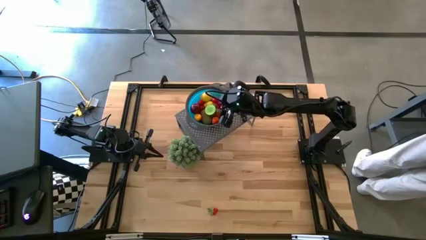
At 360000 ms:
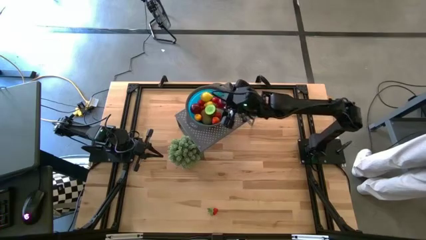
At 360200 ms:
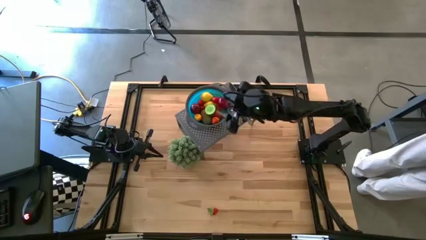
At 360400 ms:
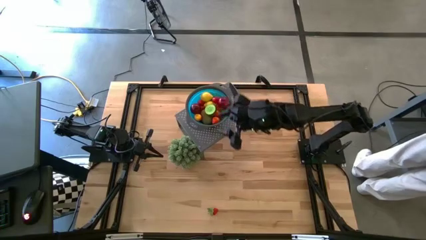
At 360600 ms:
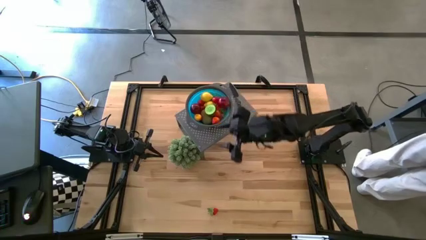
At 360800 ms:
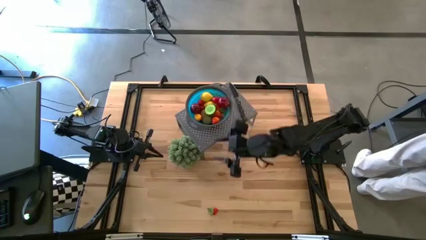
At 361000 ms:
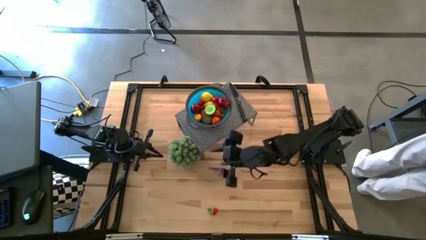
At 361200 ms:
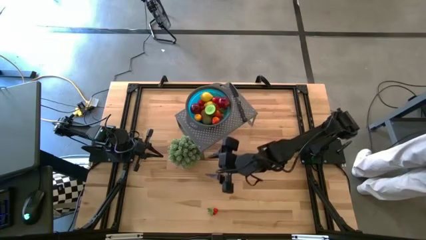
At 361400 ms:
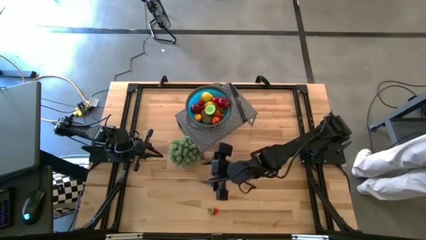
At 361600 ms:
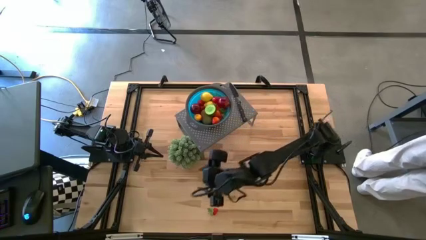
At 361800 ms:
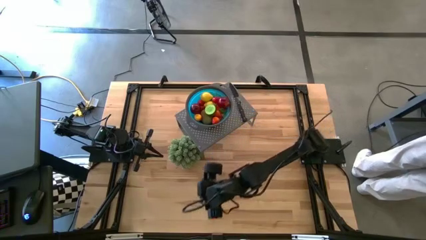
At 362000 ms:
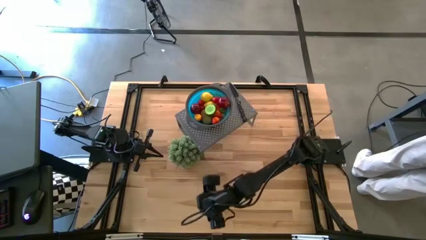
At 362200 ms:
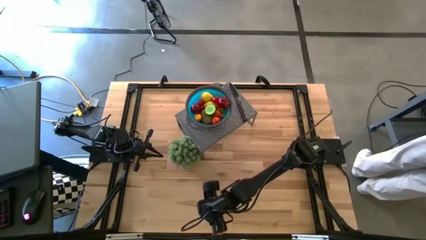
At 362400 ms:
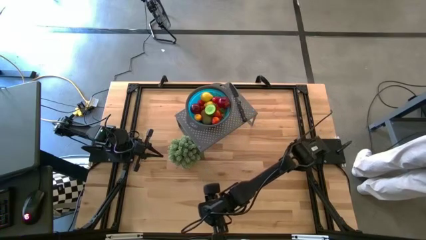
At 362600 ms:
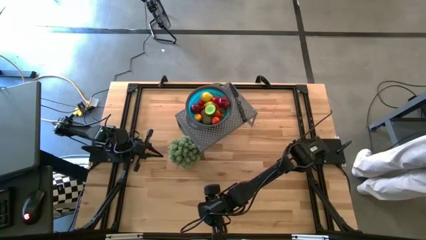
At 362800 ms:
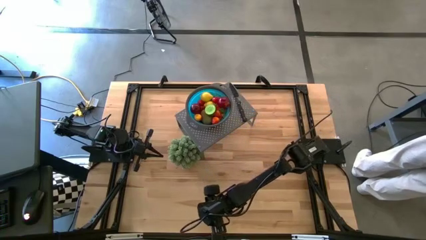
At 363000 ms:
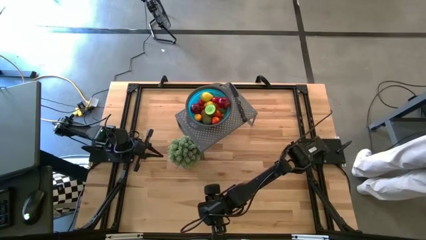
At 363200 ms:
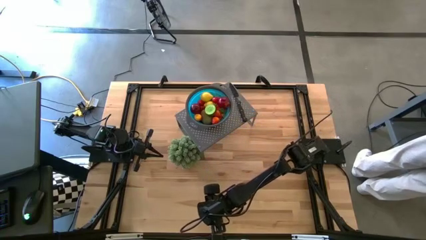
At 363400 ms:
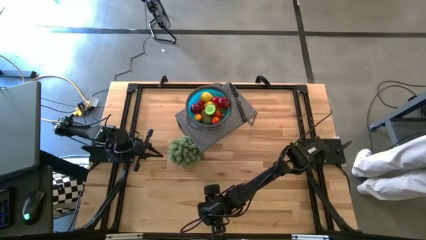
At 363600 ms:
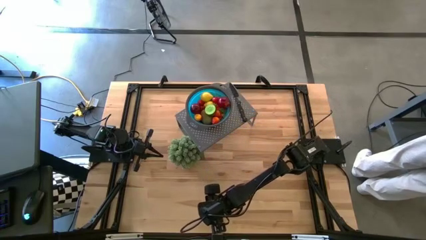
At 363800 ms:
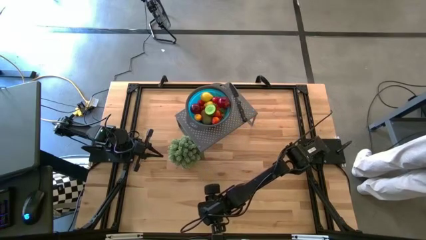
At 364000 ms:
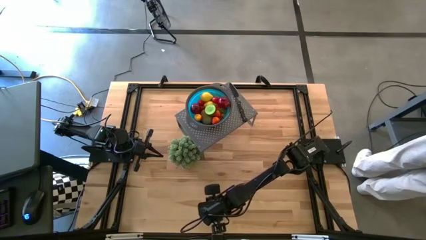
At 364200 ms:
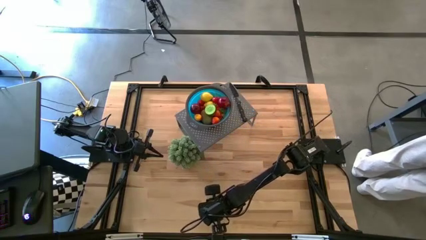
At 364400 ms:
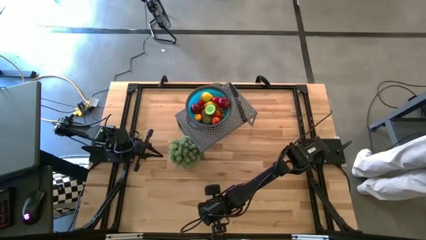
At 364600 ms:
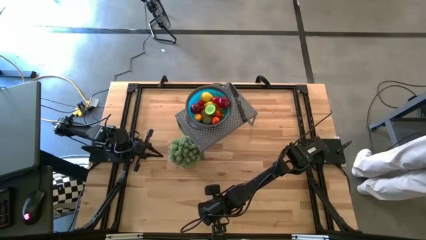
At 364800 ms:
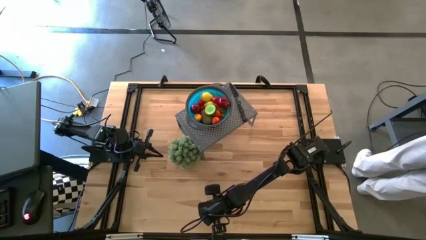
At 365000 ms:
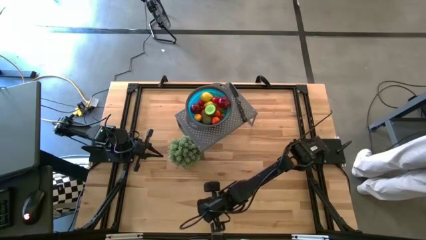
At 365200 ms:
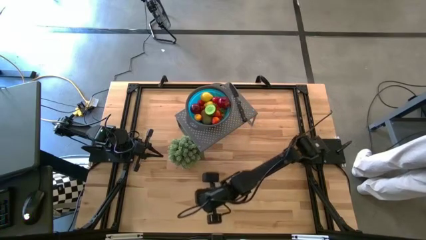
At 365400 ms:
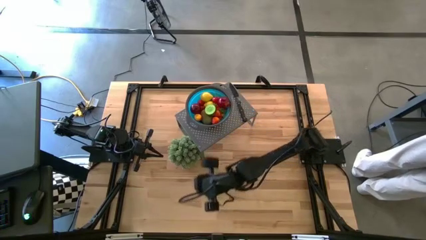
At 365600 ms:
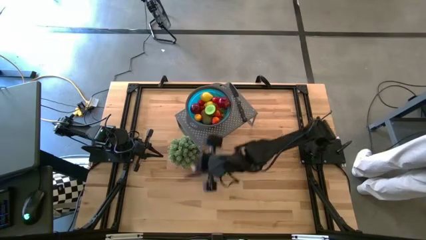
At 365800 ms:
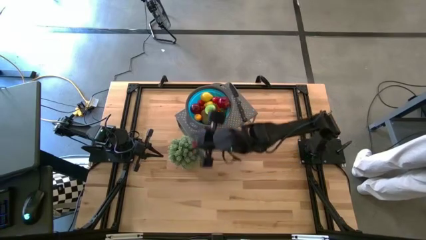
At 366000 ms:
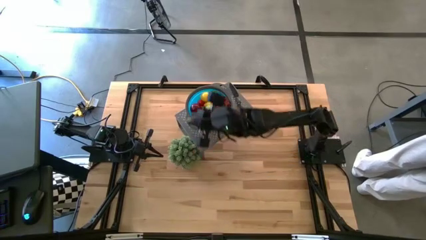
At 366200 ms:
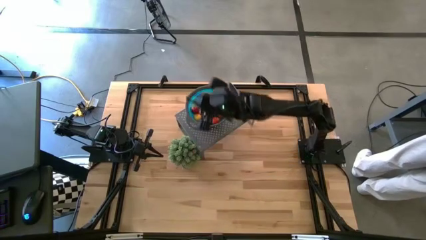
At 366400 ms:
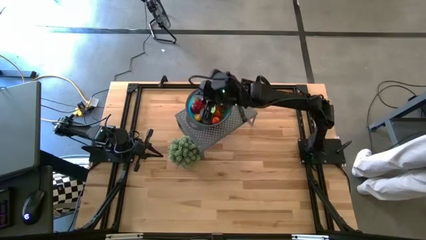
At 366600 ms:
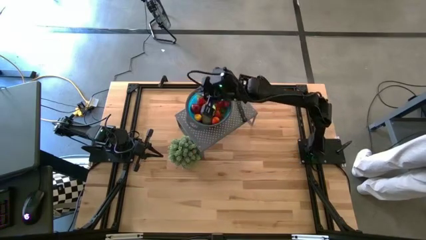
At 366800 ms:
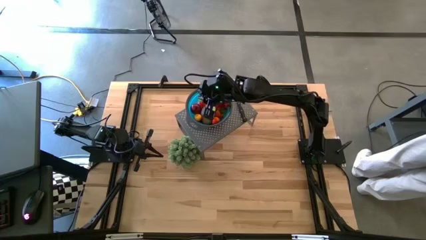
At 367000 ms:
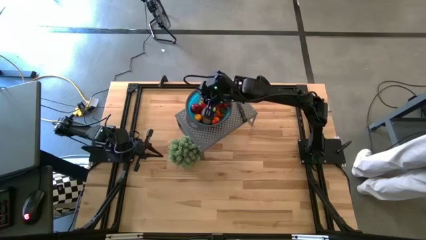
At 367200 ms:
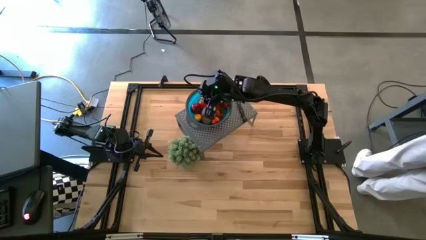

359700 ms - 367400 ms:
Task: Pick & Place Fruit
Put the strawberry into the blue strainer bowl on the shelf

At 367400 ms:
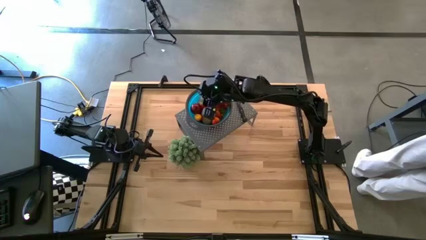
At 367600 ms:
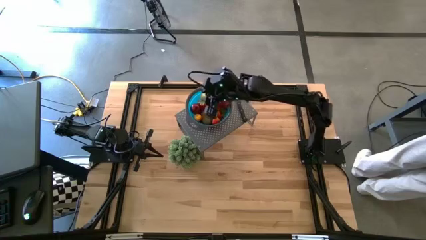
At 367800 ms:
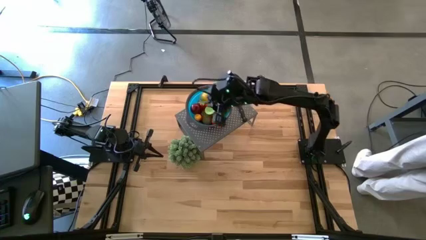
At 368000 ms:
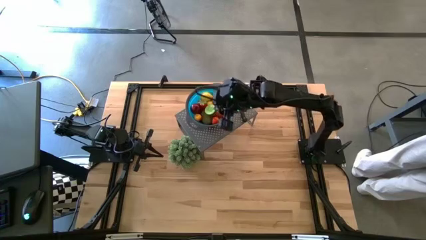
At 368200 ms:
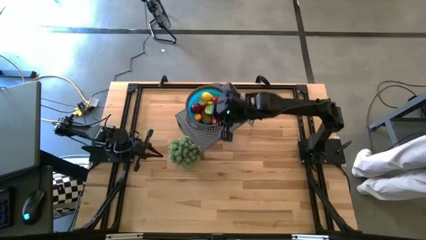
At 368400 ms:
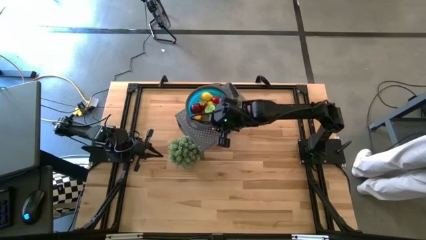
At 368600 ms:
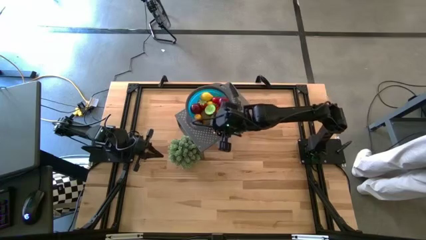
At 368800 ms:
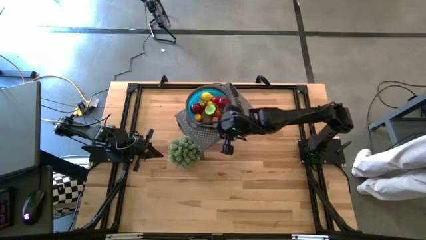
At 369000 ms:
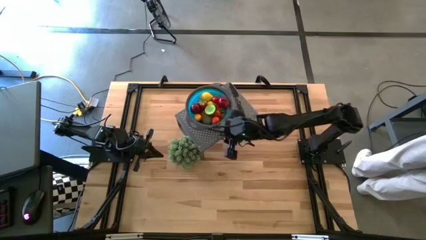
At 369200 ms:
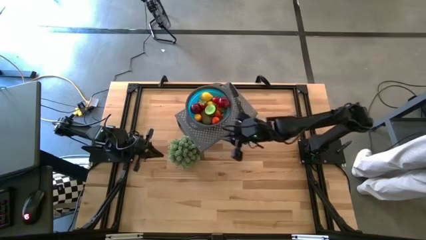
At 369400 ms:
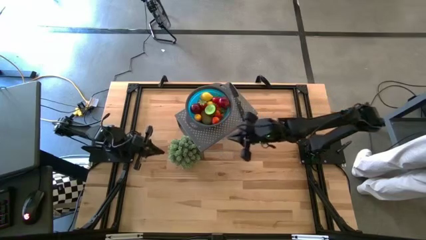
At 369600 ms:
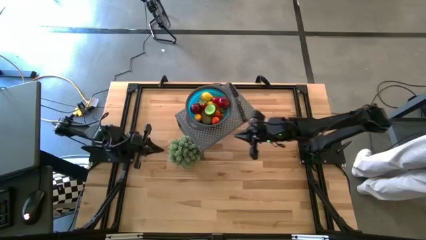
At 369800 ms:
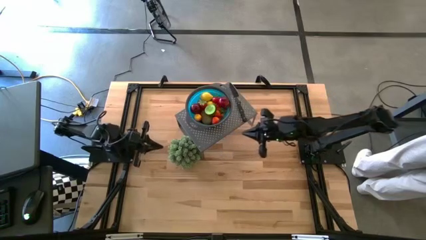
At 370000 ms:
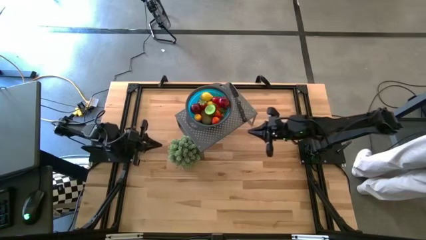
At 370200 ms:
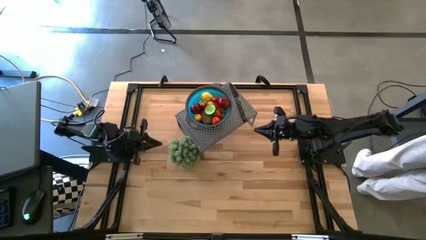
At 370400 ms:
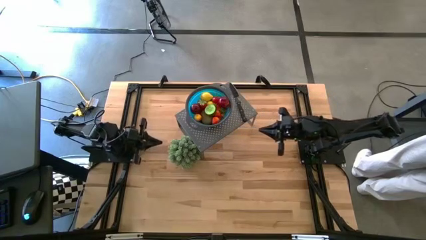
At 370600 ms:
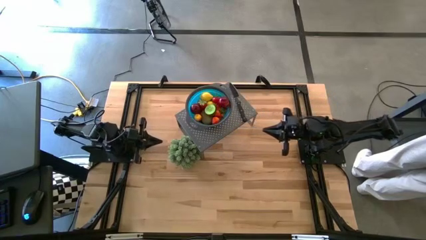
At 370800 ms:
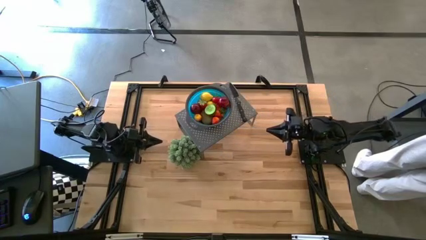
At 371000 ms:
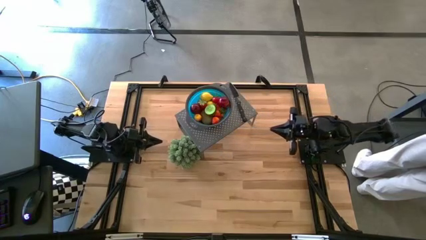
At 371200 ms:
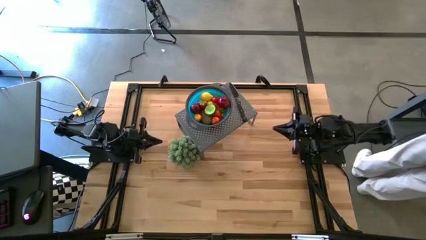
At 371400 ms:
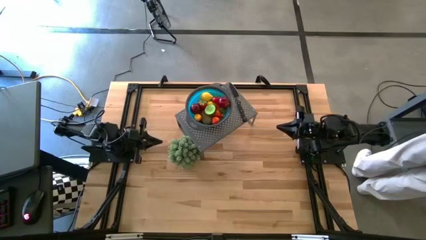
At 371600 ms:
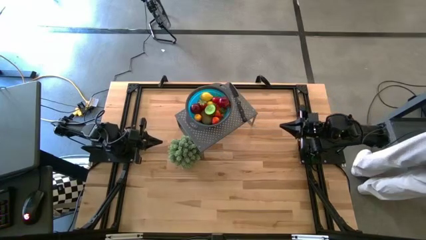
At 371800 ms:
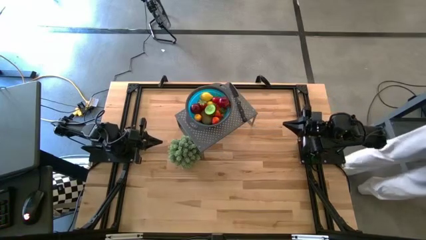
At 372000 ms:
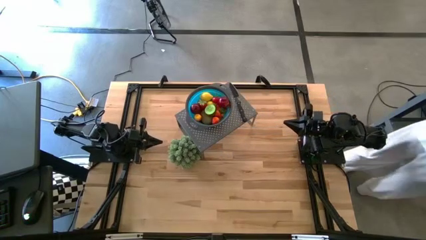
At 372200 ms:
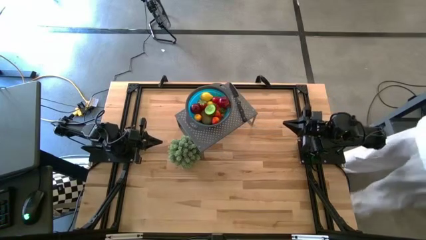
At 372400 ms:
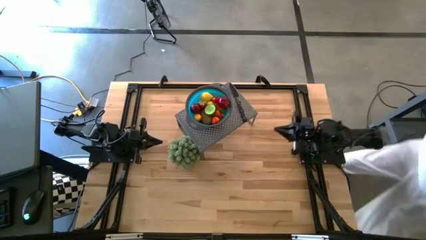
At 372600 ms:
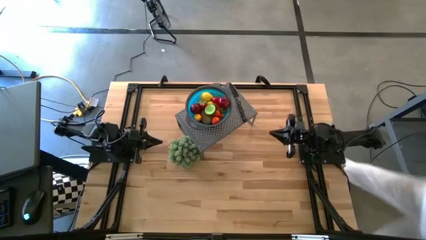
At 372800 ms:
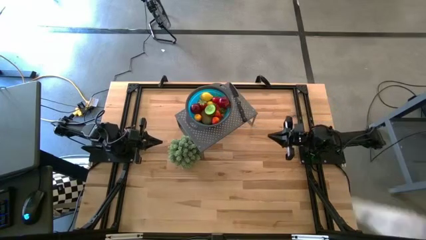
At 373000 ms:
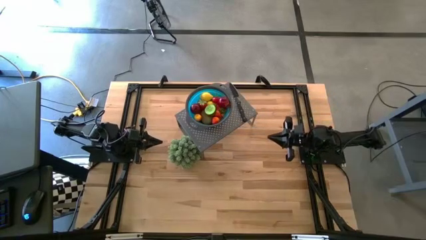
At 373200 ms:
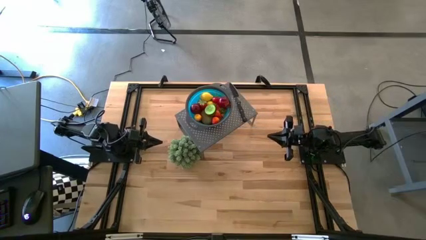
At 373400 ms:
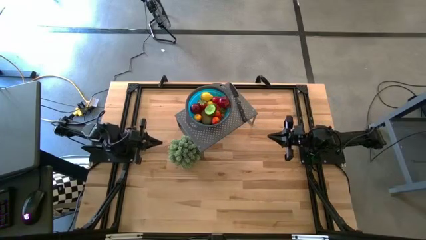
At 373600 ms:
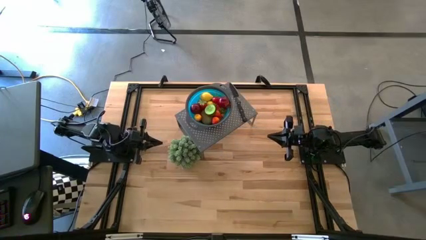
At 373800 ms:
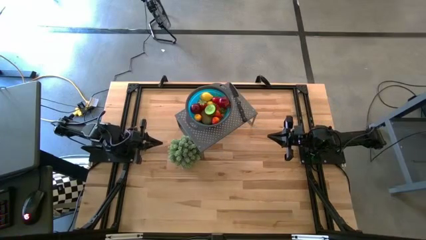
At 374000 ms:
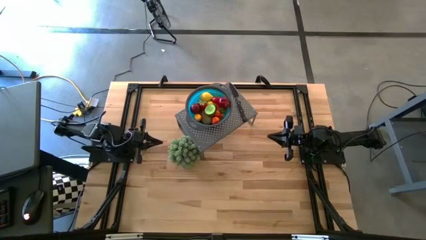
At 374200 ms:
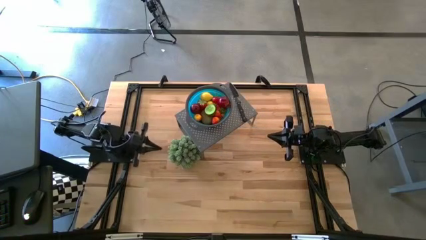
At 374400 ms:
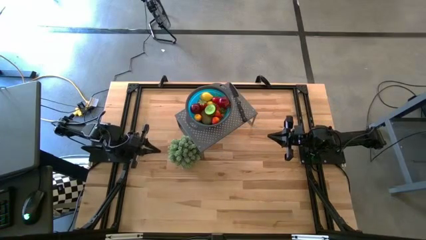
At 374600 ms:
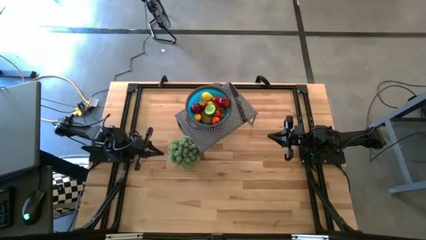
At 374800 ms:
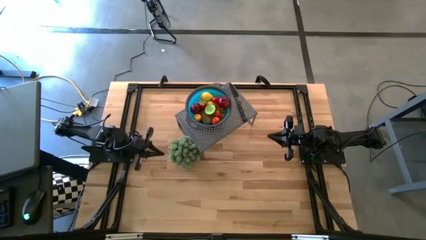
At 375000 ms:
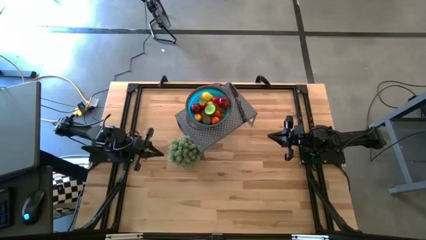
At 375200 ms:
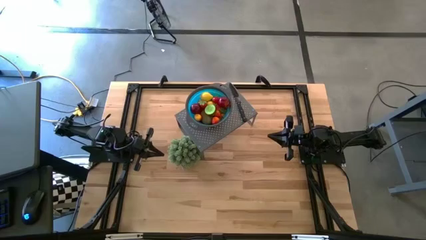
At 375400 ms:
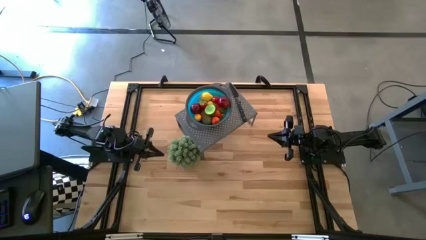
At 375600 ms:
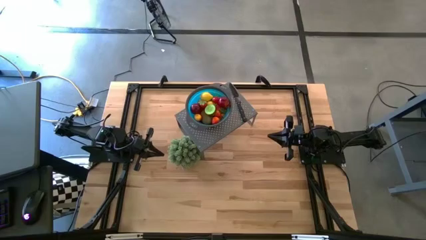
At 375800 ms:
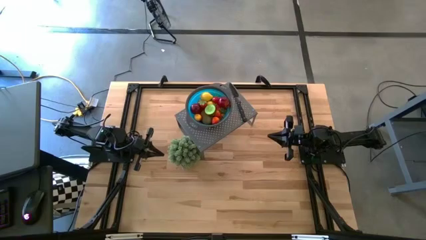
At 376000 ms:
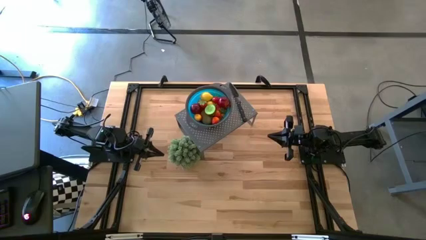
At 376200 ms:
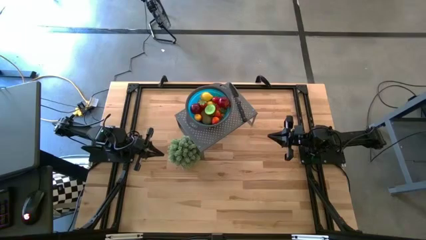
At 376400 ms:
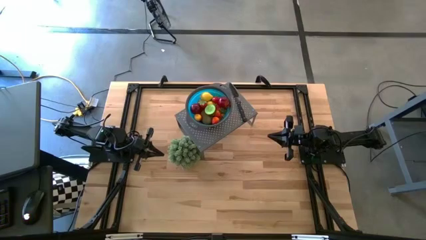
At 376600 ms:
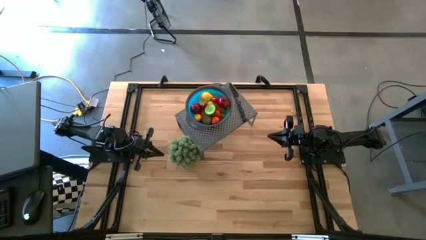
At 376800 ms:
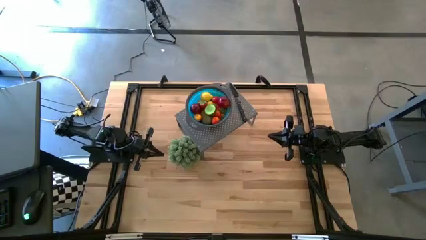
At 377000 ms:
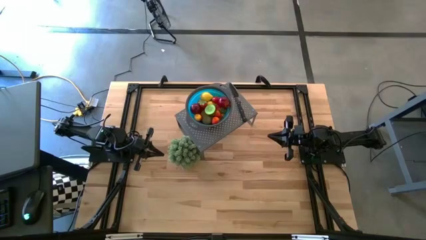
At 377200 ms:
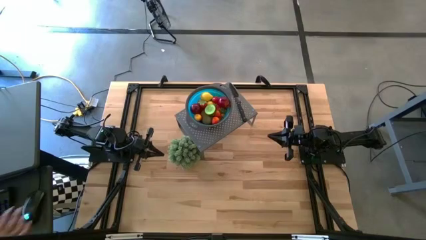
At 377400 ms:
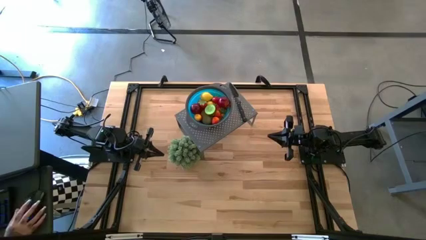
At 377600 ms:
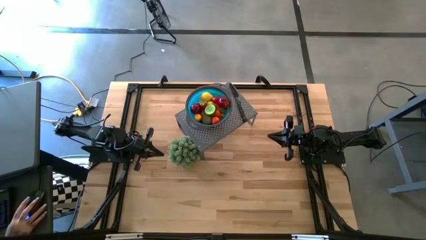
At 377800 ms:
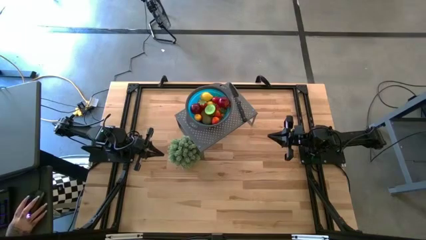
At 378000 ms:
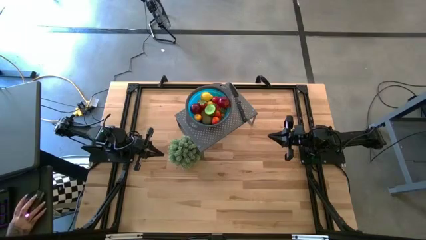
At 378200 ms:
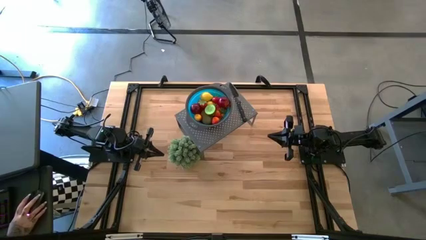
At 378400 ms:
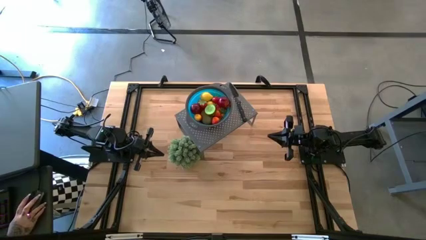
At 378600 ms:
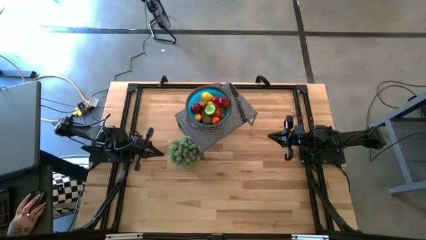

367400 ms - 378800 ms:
Return to Home Position
